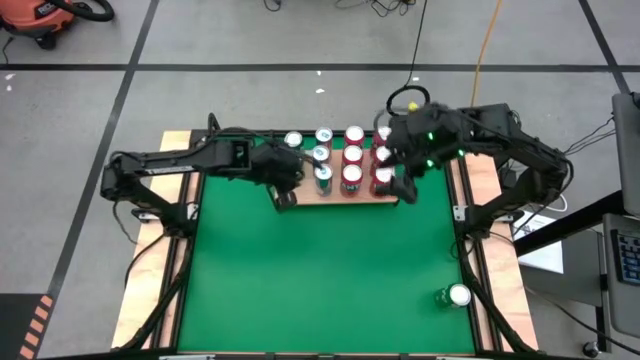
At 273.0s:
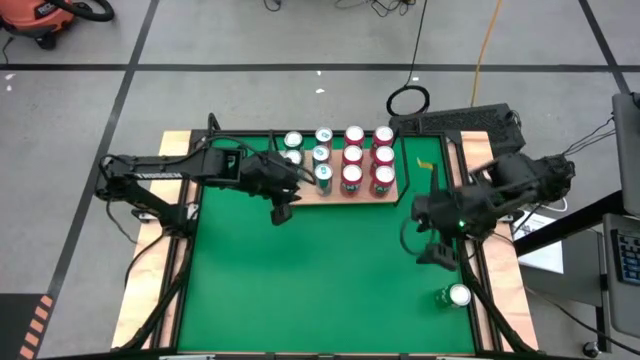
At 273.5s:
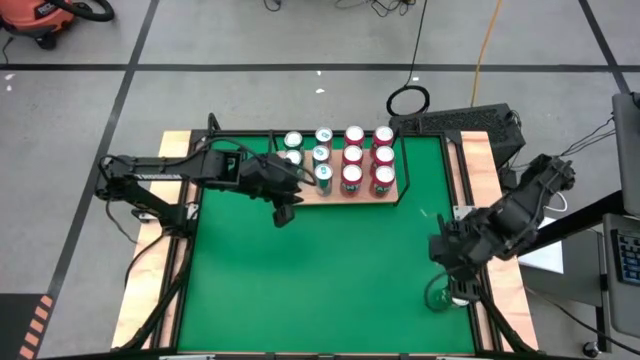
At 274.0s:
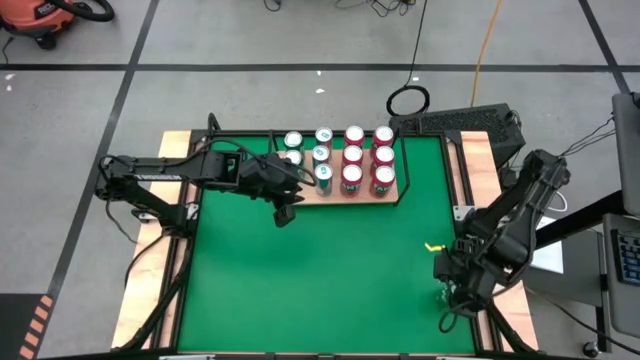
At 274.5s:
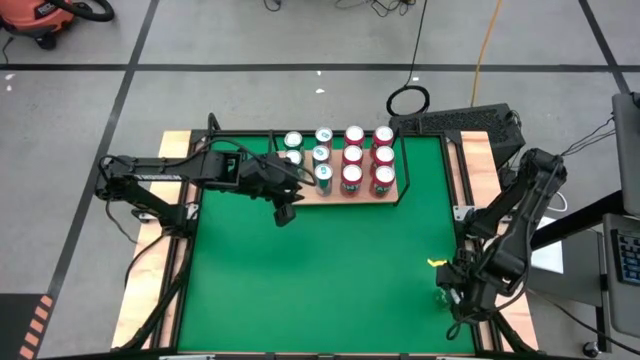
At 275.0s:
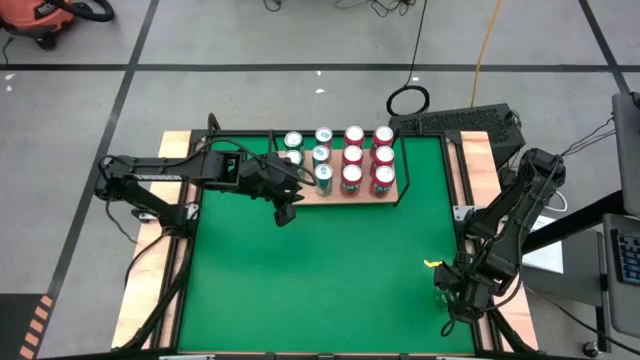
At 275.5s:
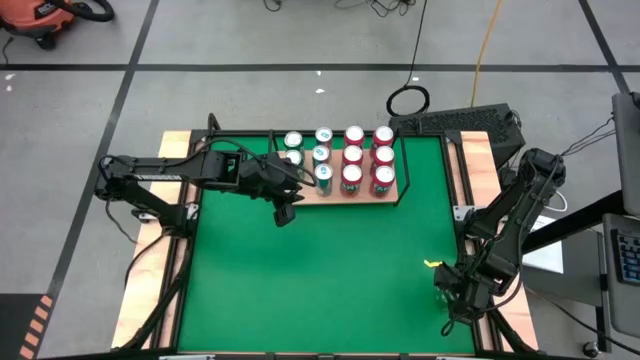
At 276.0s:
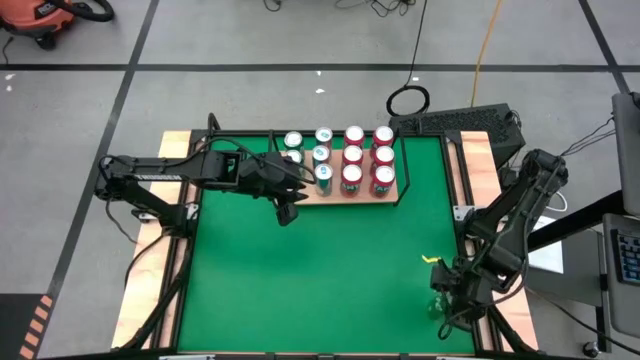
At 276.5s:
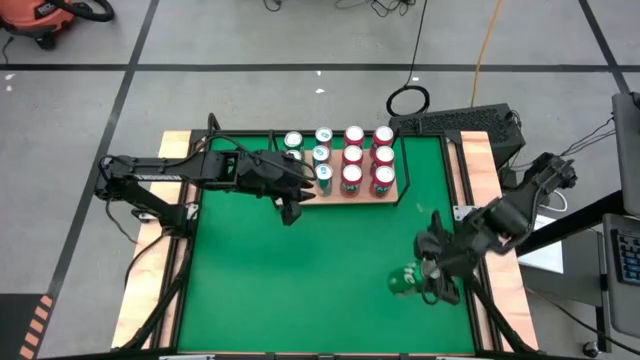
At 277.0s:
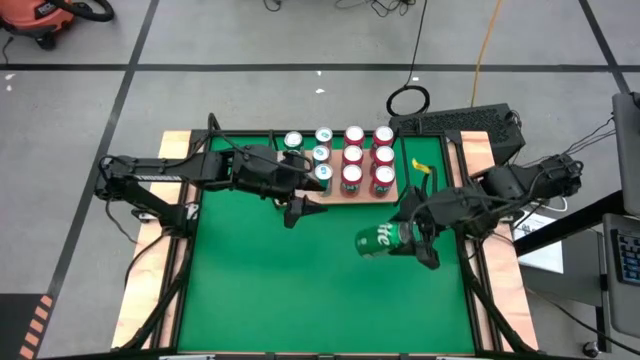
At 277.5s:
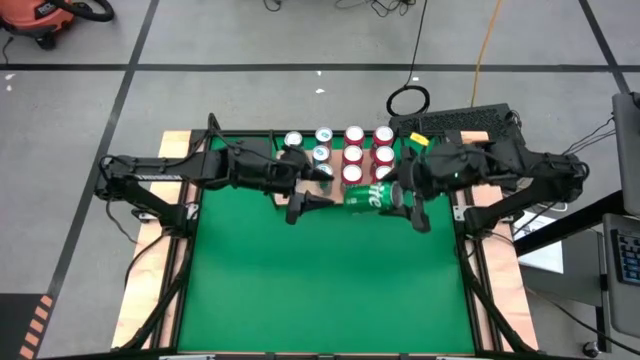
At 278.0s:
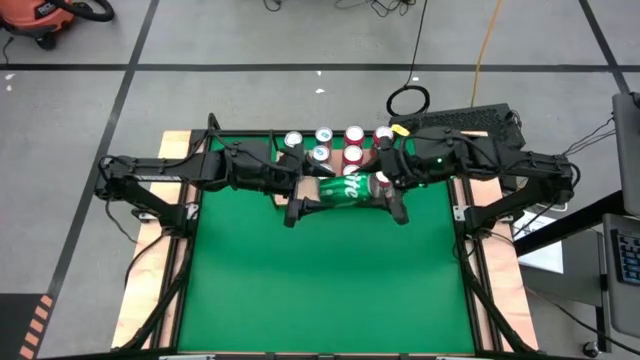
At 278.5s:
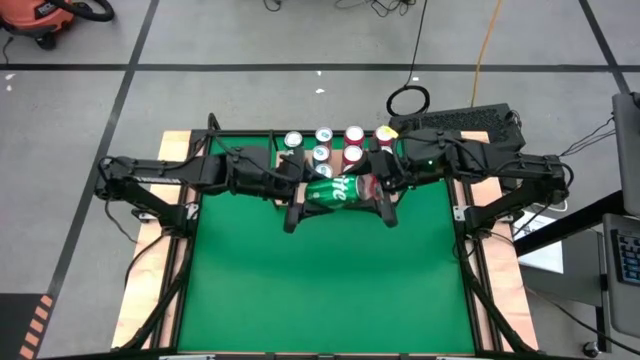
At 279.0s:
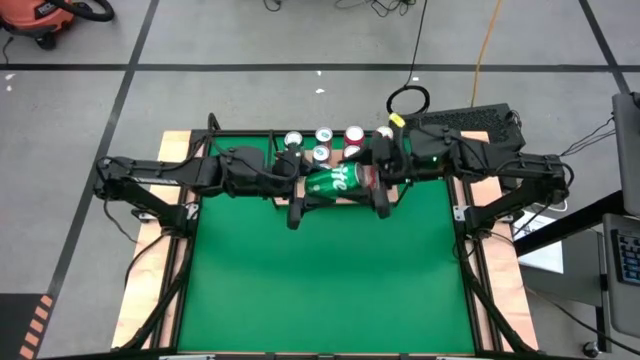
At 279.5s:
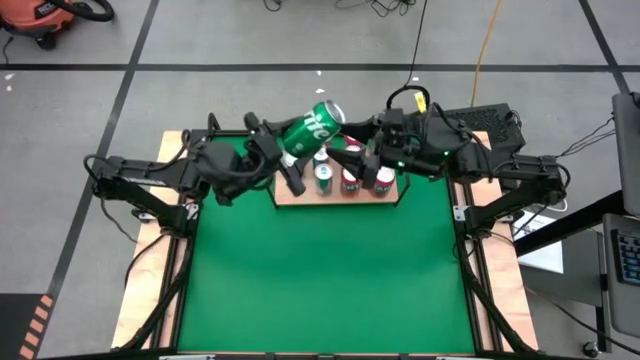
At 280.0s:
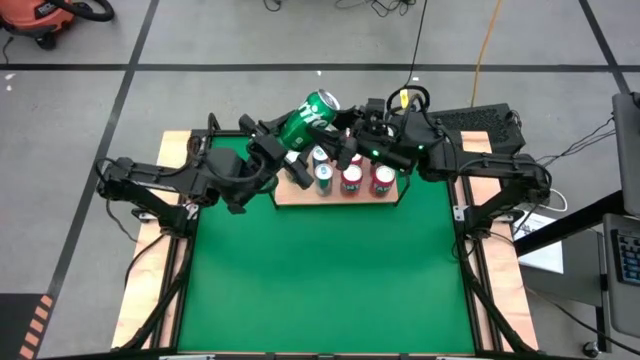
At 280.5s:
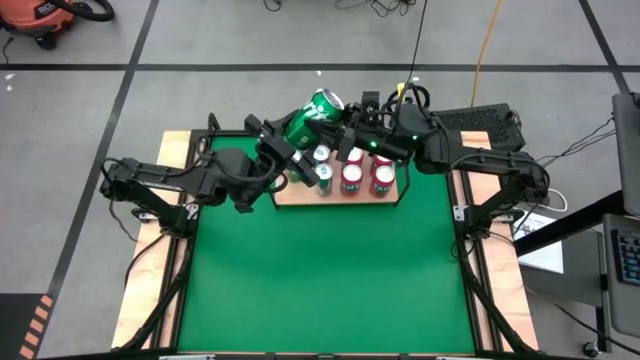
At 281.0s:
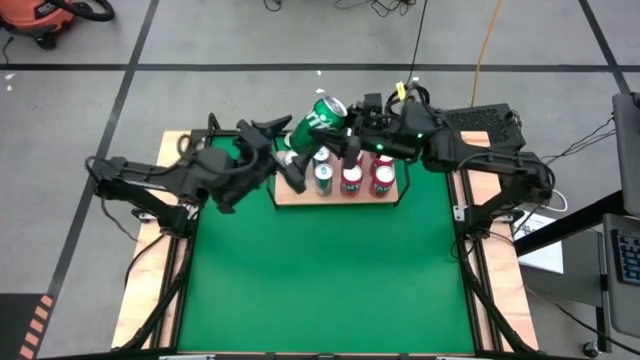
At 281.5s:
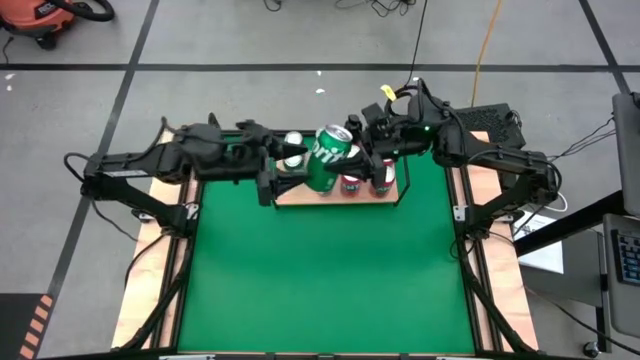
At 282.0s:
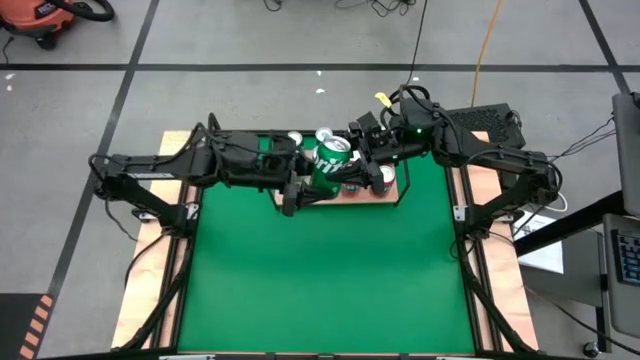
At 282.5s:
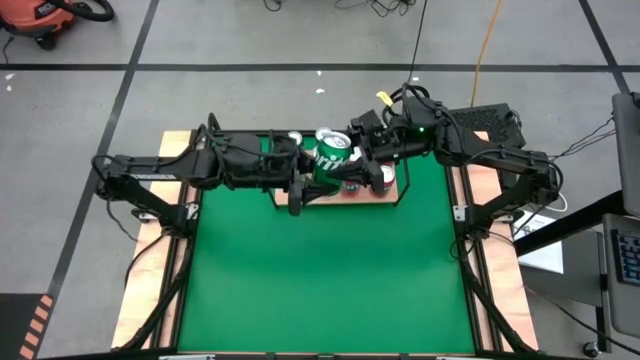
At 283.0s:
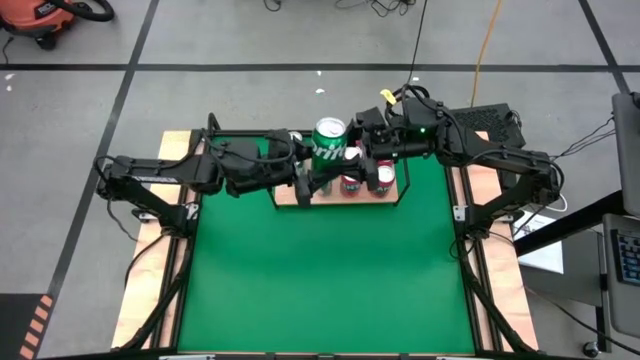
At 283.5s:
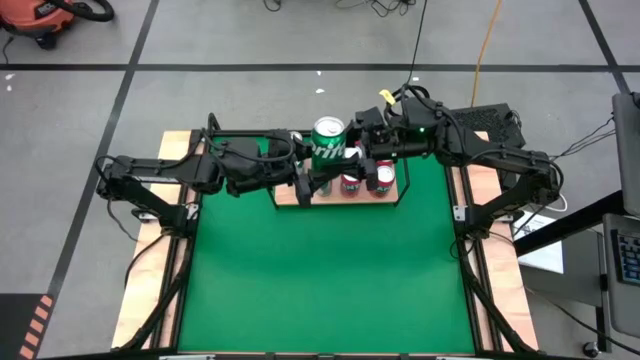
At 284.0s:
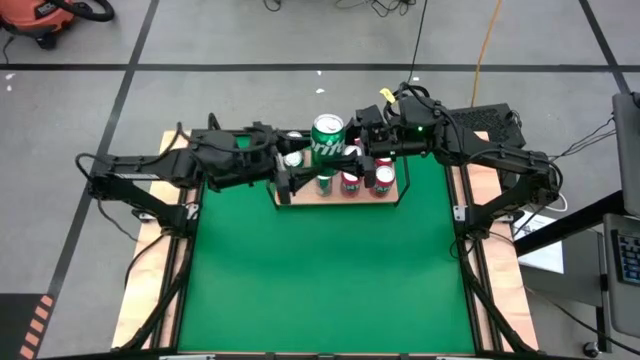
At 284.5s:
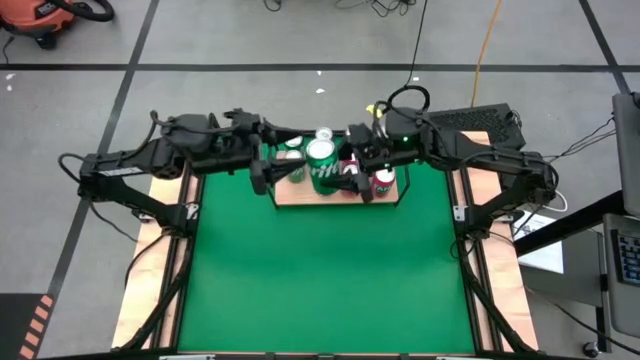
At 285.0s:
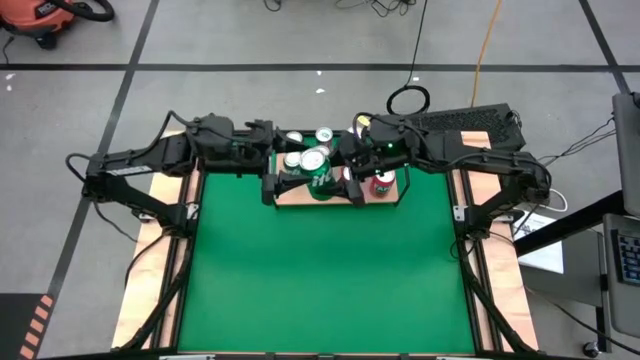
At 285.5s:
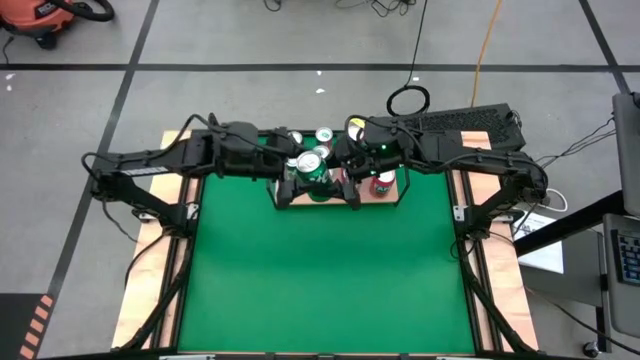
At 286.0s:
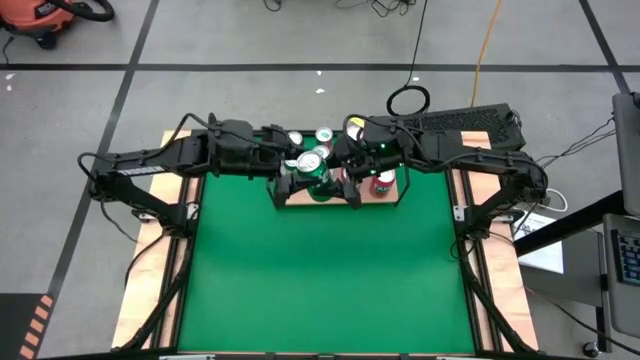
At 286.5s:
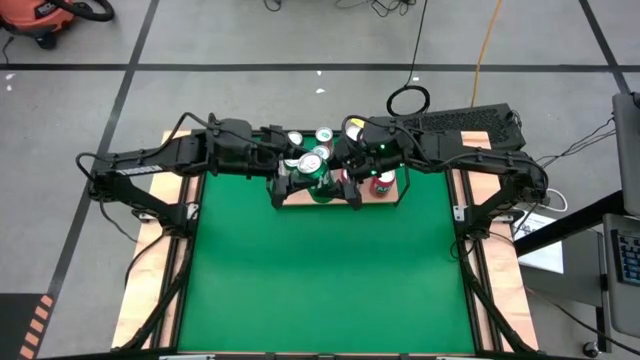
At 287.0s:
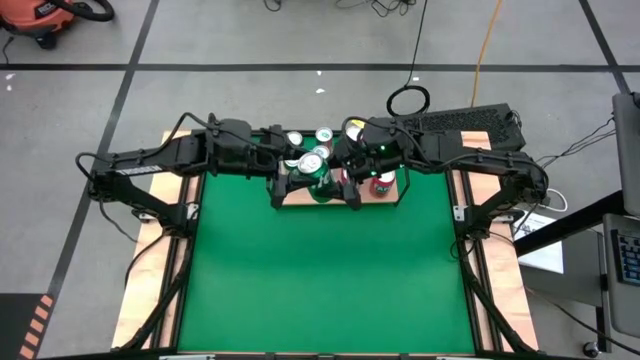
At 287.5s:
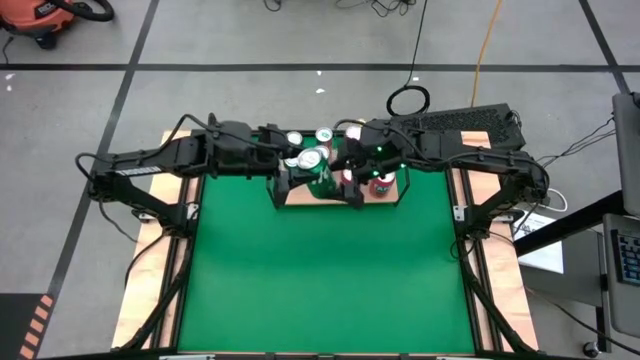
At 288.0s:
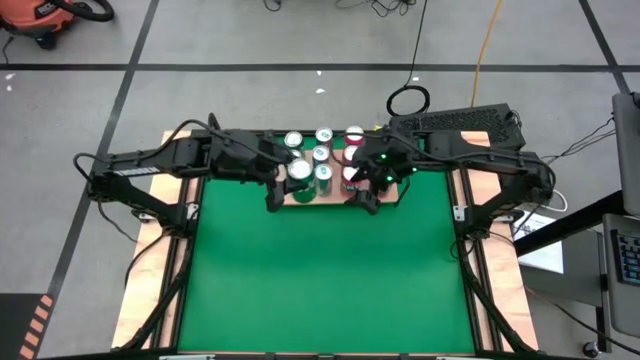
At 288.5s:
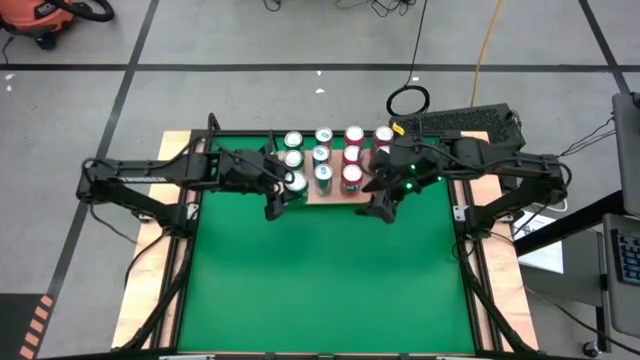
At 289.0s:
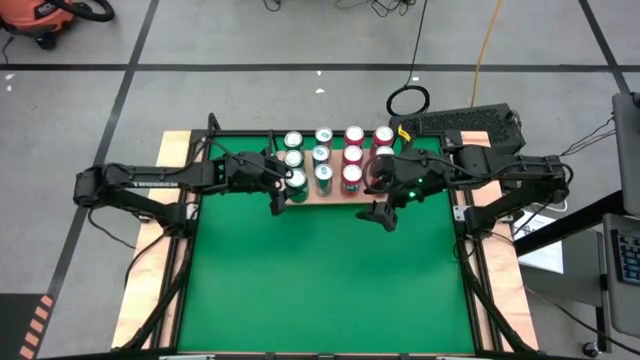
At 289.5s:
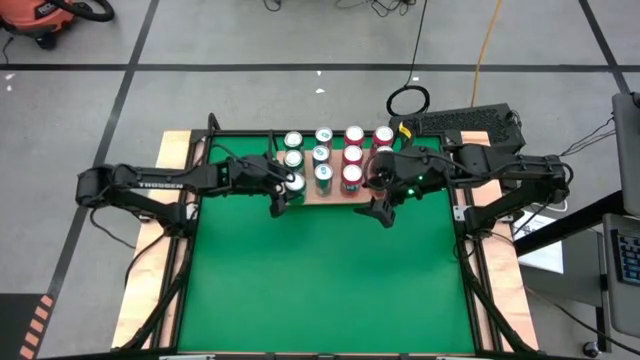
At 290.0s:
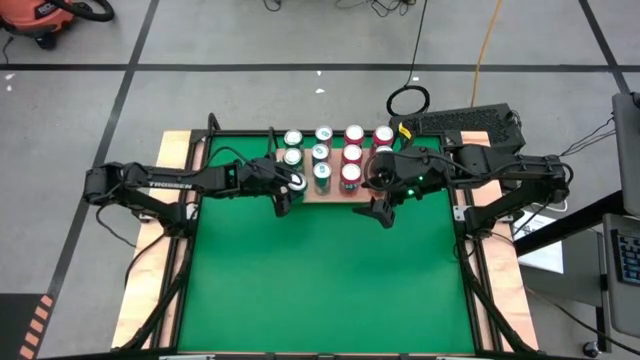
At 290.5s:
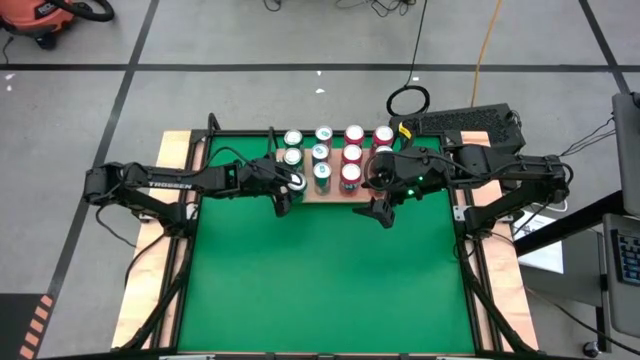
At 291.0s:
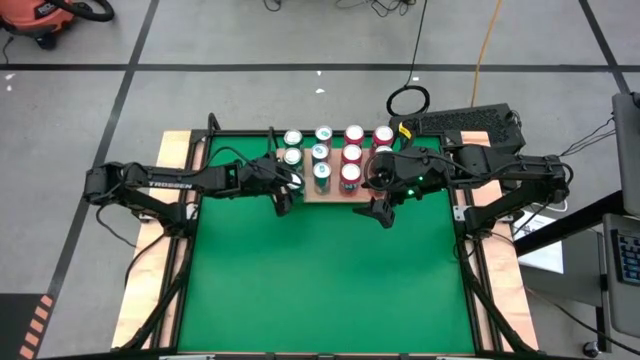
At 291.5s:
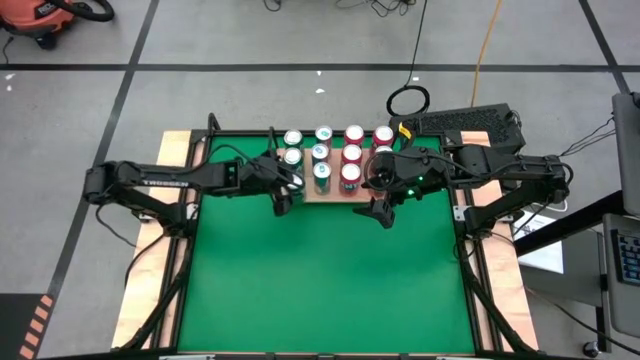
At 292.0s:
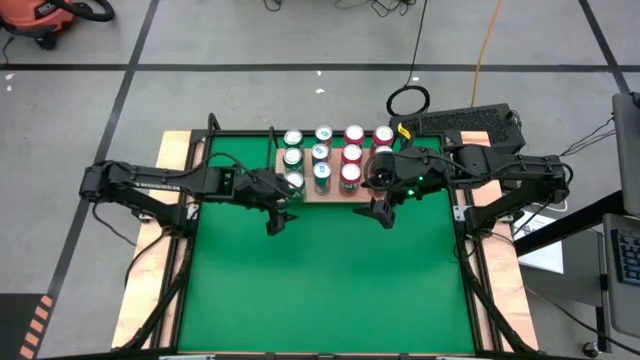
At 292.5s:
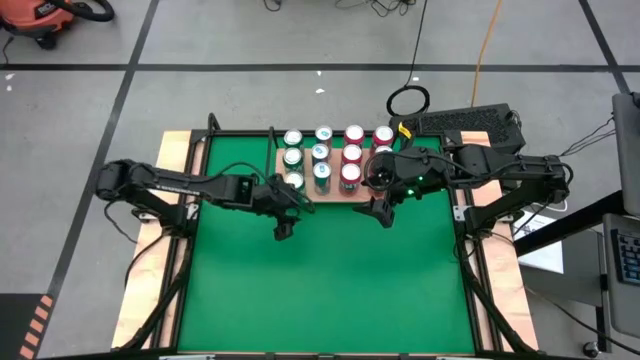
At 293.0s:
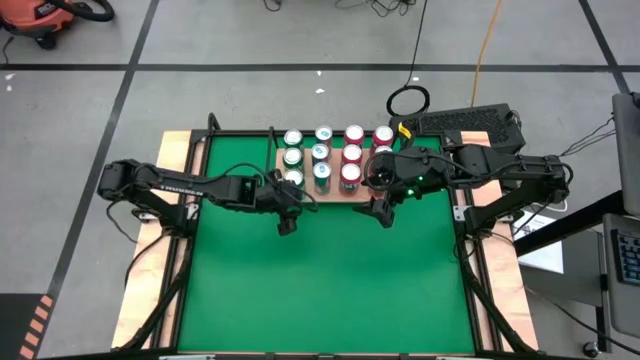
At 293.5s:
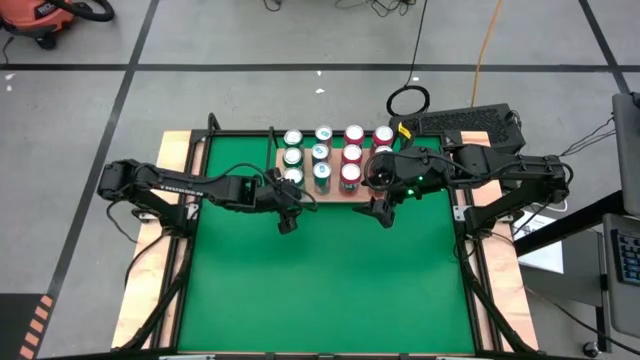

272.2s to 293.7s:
Task: Place canned beverage on shelf
Put the green soda can on the shelf aligned with the other green soda can on the shelf
